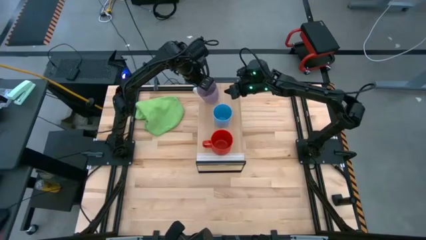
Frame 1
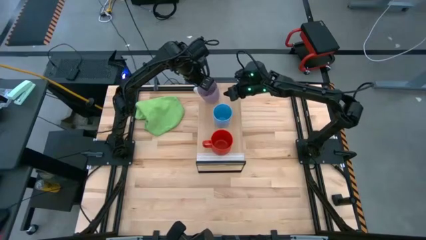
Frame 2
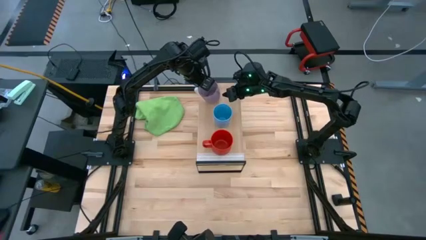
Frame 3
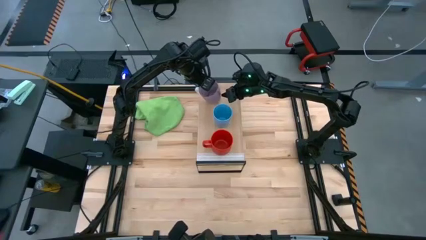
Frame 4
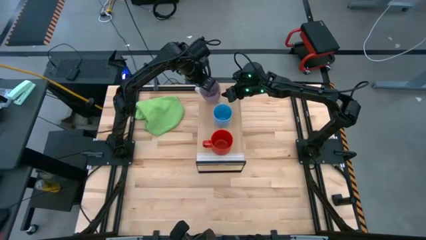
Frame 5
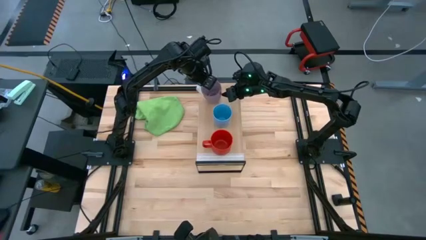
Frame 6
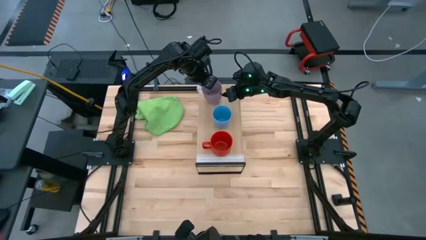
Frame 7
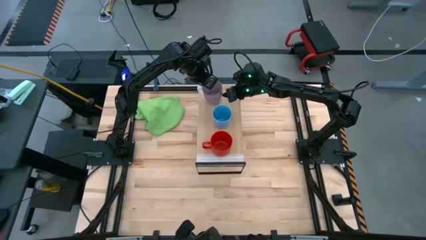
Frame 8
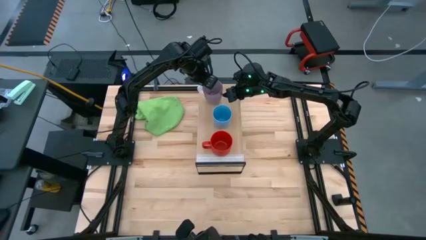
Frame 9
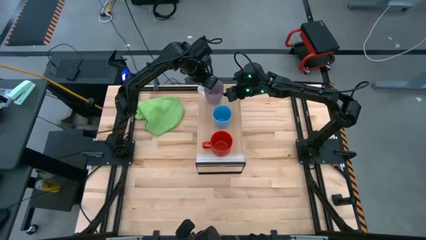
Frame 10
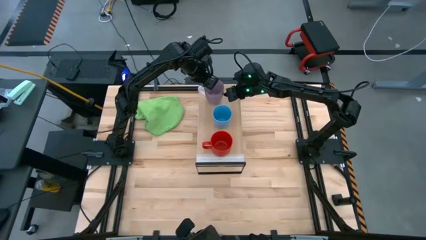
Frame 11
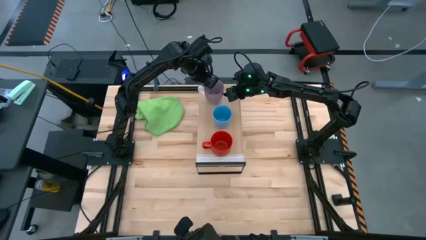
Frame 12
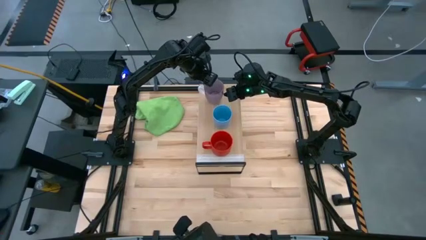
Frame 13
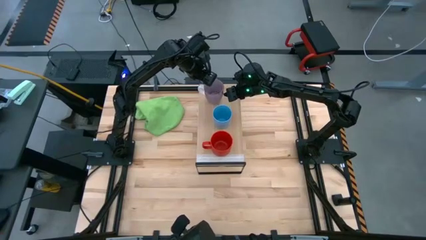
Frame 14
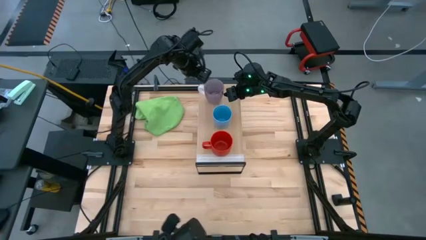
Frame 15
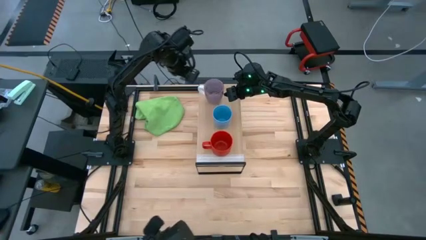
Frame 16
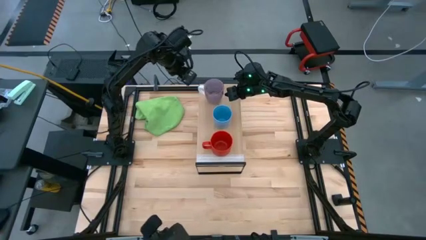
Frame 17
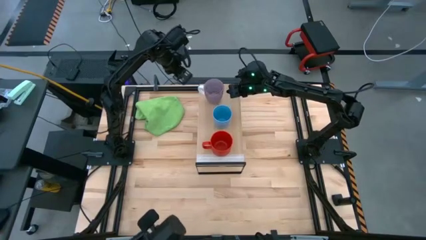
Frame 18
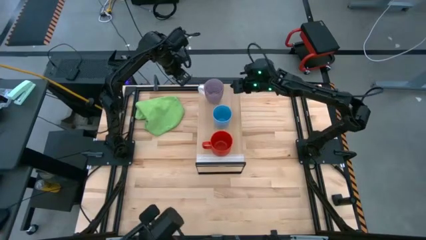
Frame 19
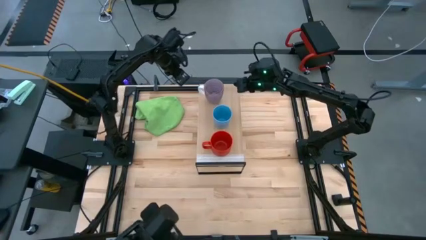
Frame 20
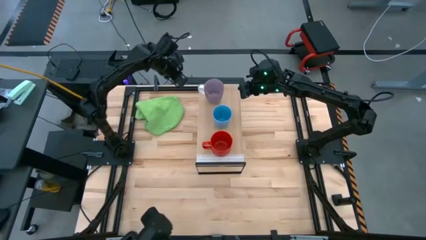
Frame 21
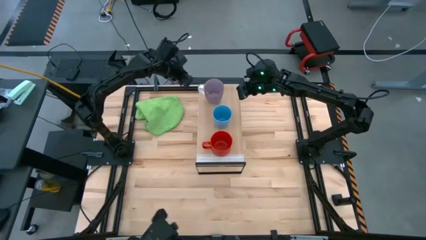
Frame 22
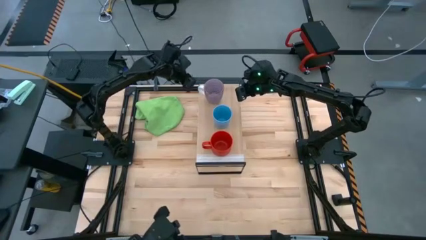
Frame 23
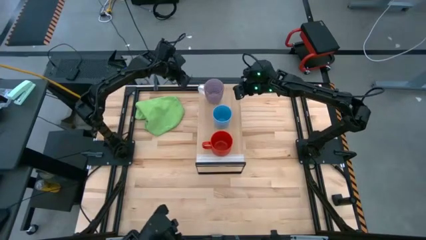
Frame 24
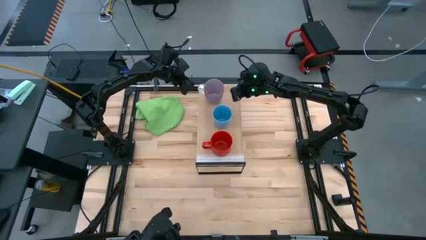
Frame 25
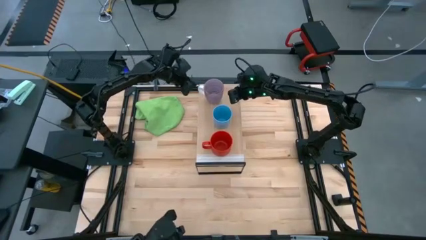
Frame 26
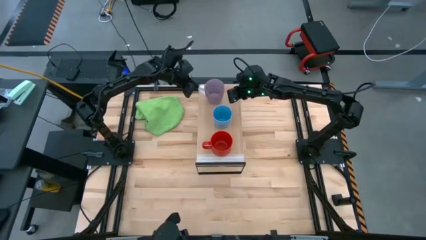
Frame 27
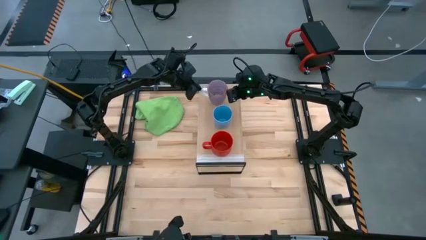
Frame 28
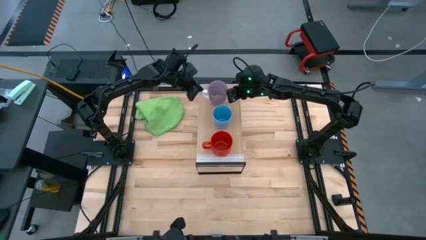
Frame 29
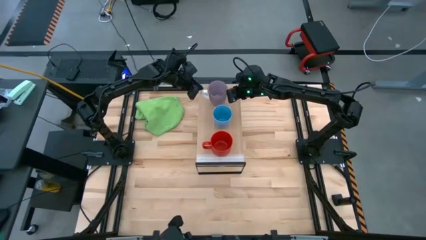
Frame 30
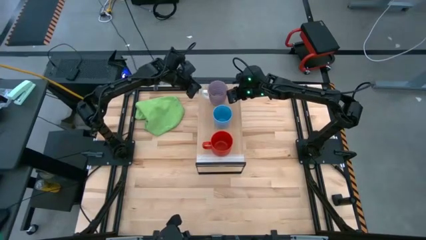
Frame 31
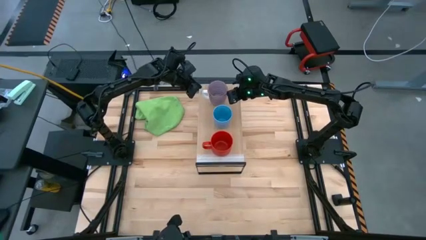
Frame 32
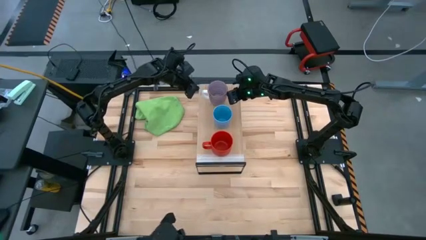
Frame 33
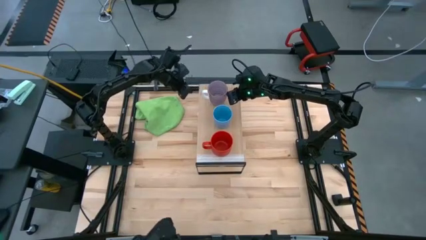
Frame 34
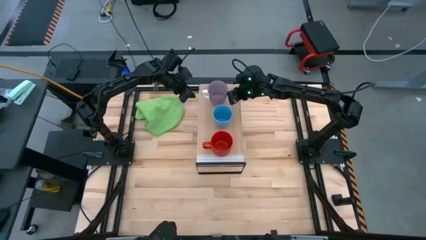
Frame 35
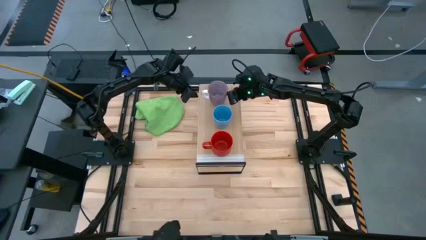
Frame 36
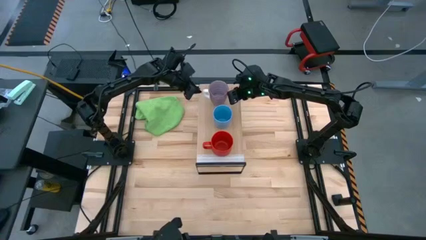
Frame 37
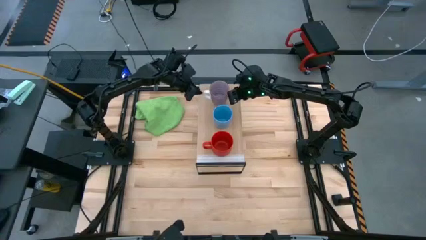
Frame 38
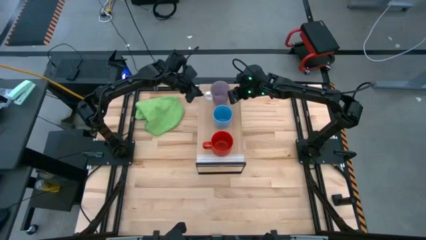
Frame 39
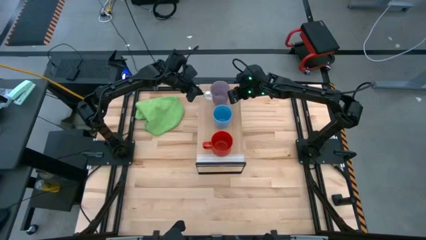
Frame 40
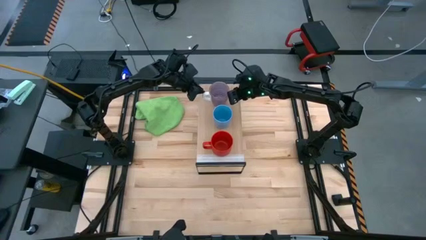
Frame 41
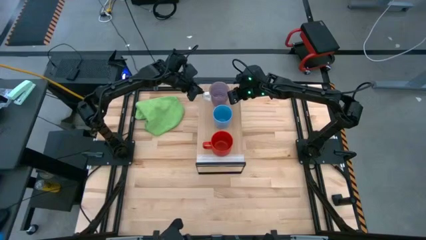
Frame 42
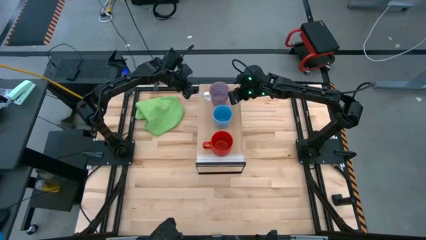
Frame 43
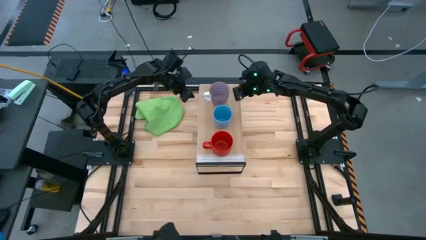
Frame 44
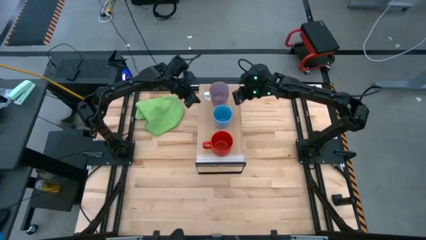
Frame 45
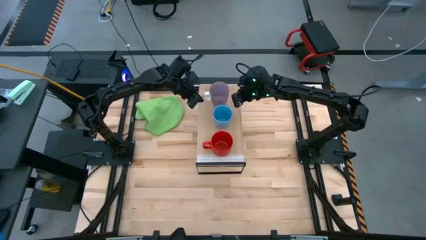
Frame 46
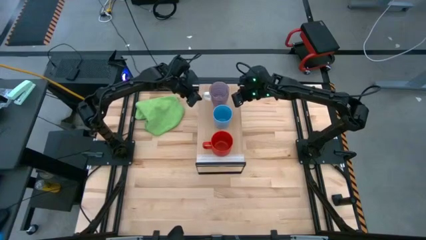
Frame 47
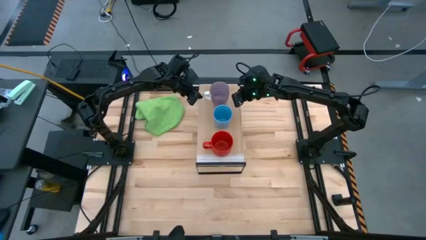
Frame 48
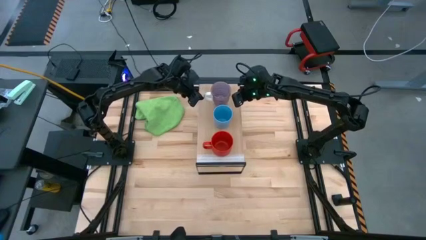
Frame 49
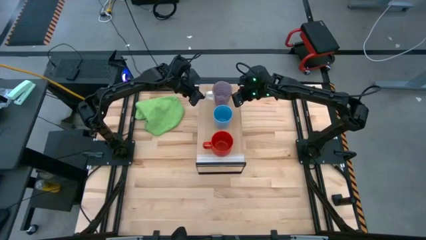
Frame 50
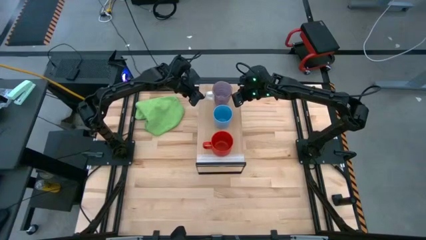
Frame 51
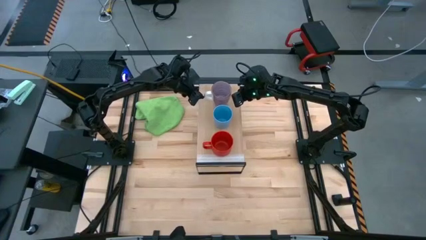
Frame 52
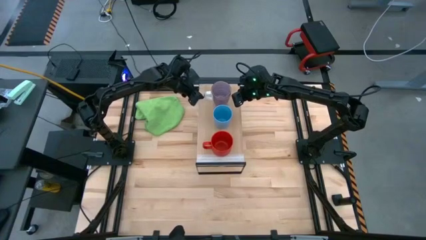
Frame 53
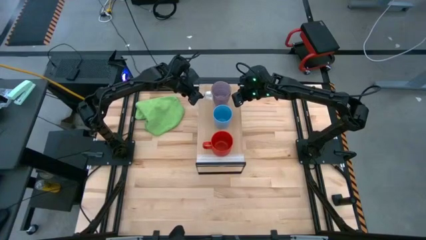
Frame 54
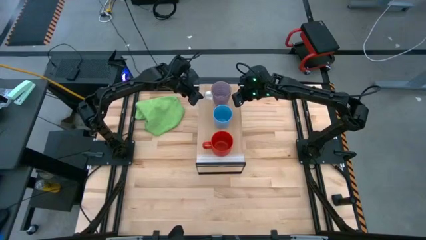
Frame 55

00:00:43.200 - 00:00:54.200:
Task: Stack small to large cups/mugs on shelf
Put the purple mug on the shelf

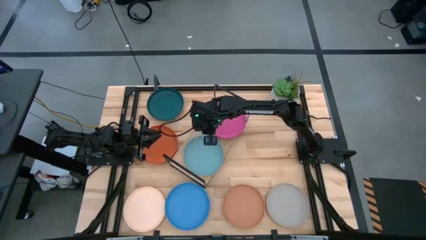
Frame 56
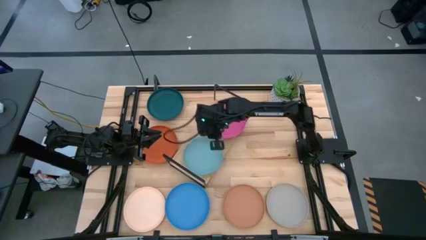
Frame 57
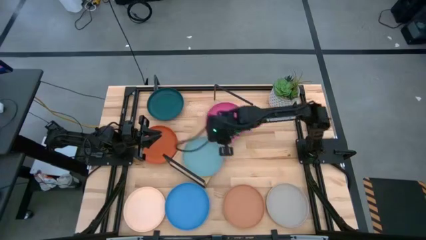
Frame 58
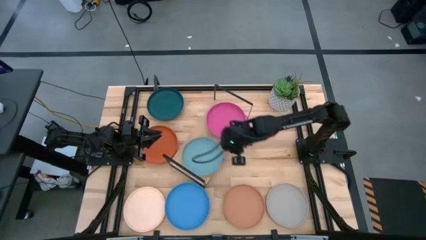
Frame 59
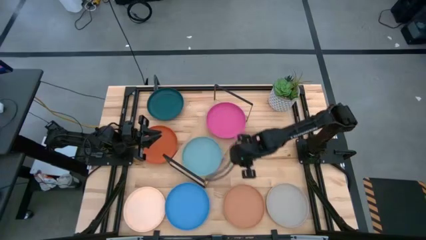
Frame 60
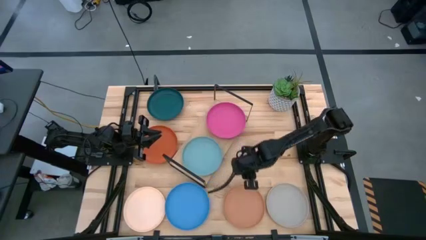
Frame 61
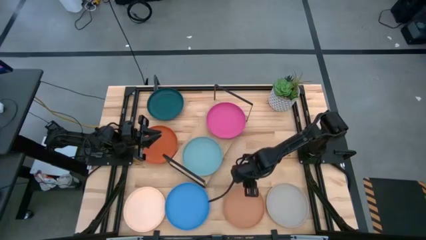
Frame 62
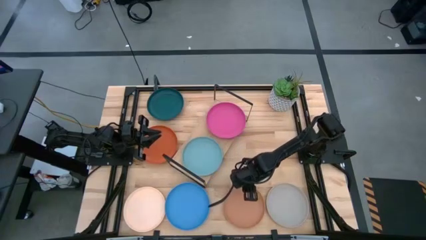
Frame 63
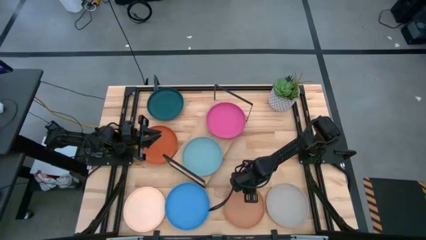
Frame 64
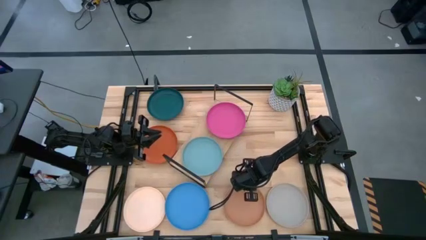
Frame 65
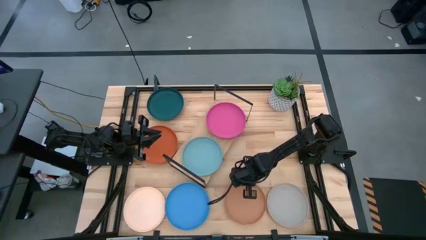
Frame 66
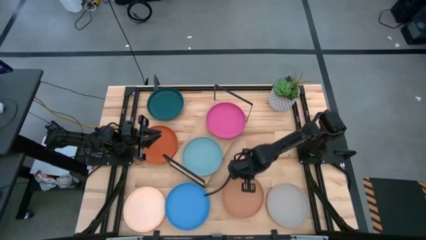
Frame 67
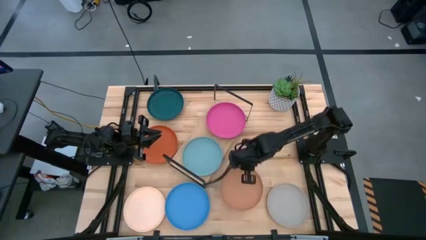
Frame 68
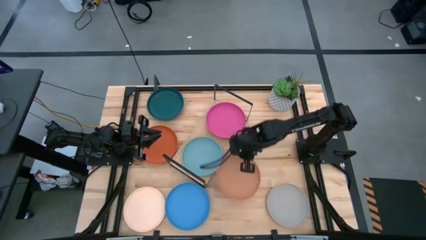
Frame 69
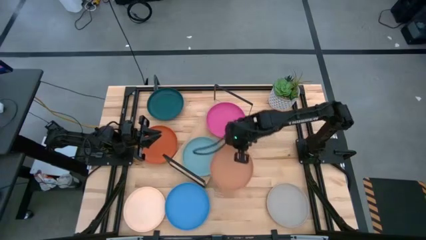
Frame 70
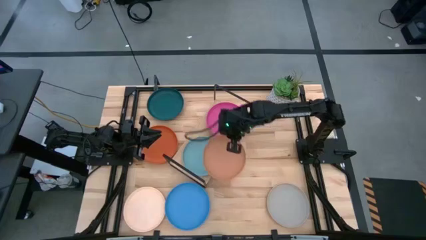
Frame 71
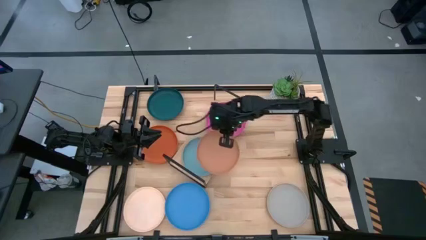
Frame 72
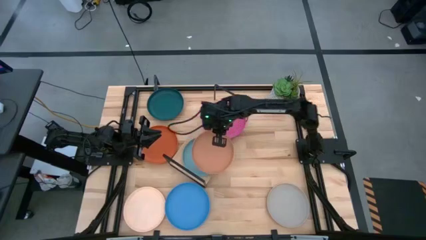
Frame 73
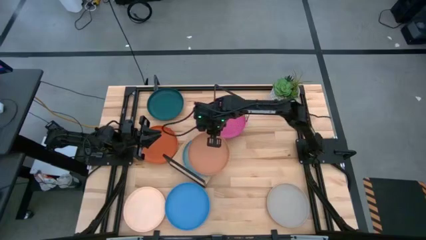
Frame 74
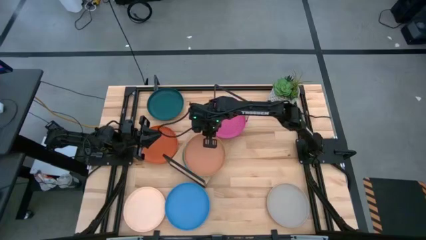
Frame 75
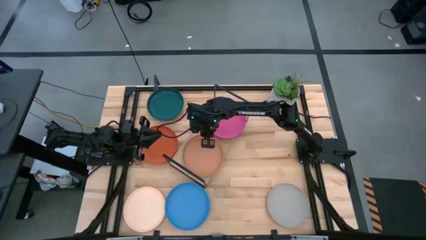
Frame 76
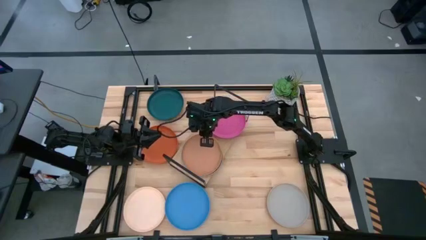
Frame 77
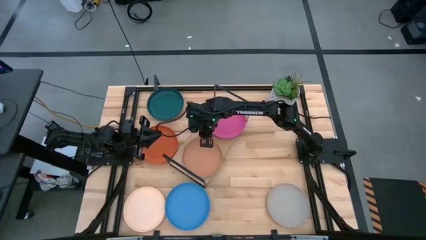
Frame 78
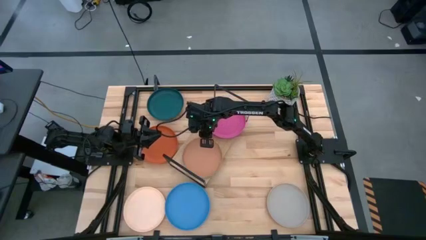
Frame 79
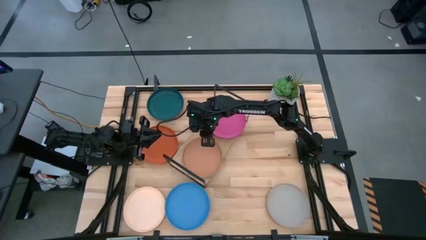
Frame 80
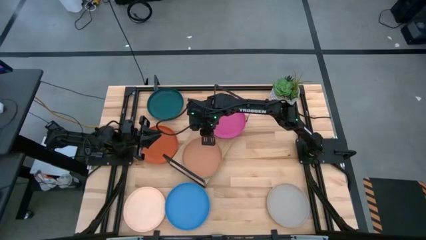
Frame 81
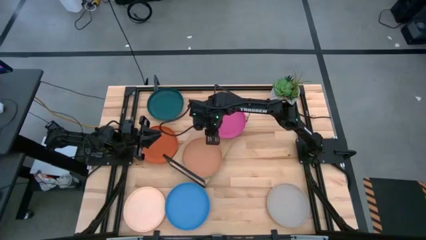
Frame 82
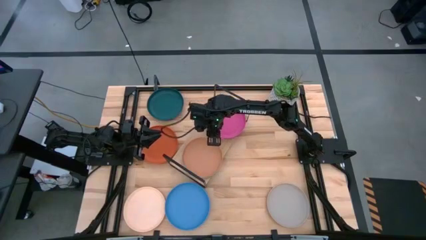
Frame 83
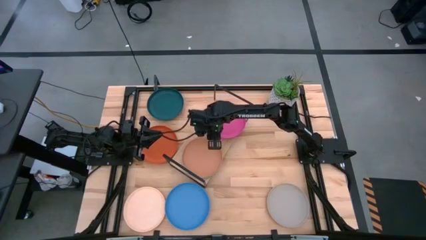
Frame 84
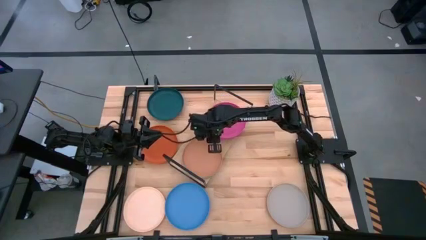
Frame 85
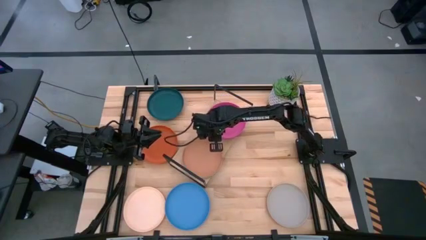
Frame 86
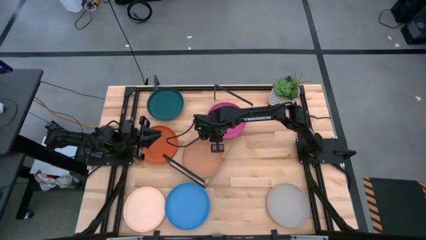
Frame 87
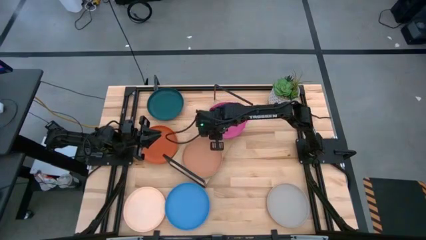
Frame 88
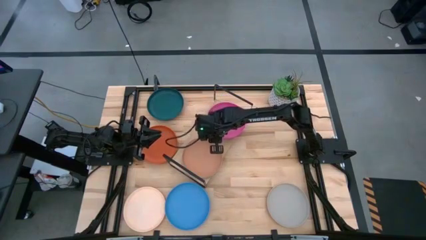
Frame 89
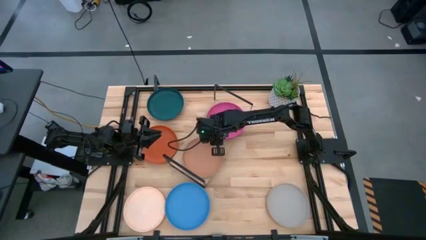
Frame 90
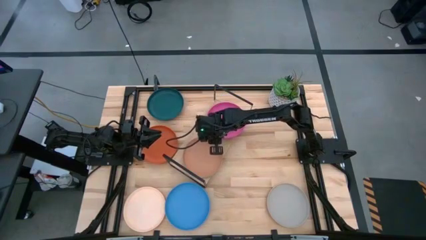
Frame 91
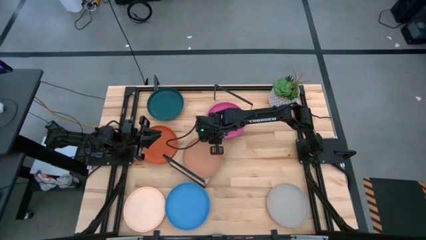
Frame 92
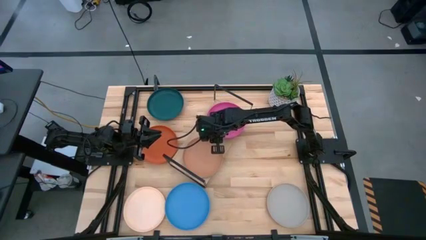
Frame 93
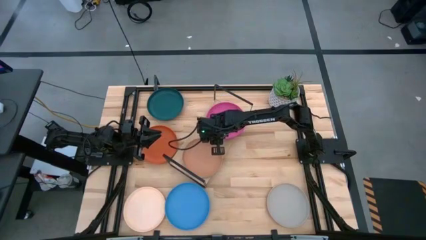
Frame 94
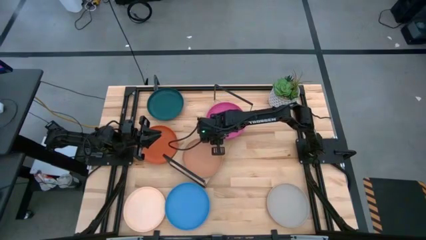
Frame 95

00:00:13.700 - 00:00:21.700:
Task: Place and stack plates onto a shelf
Stack the brown plate on top of the light blue plate
